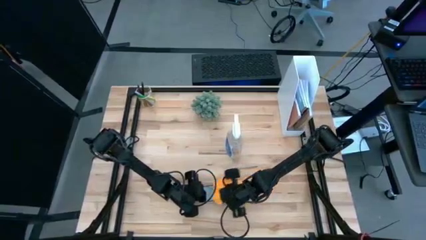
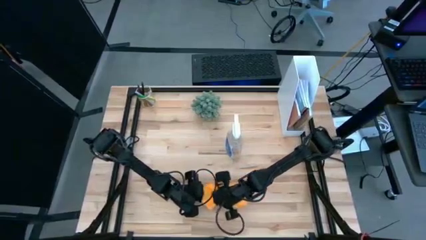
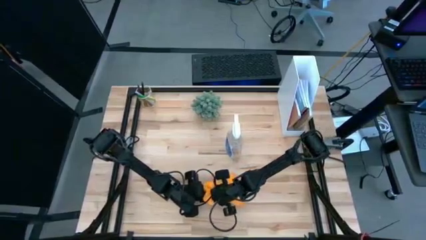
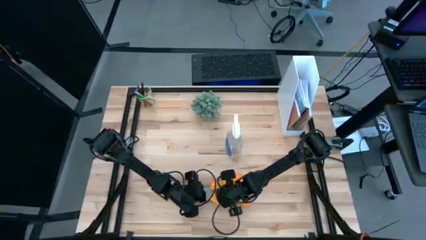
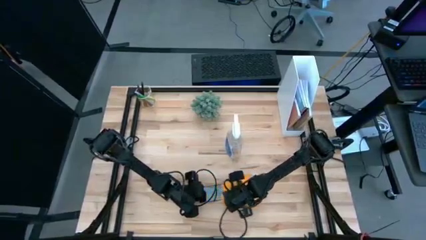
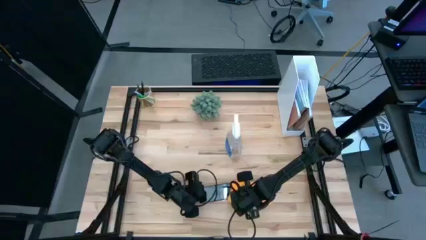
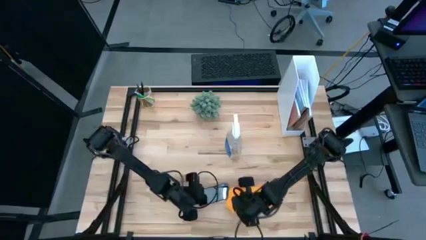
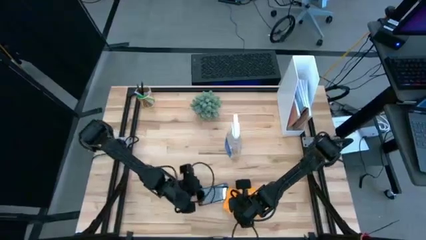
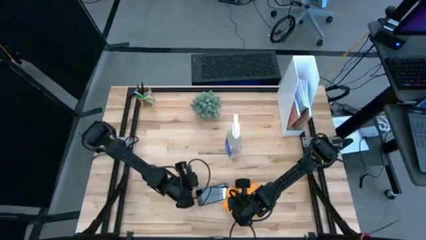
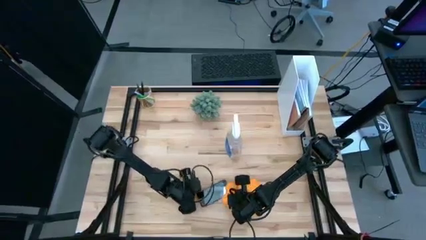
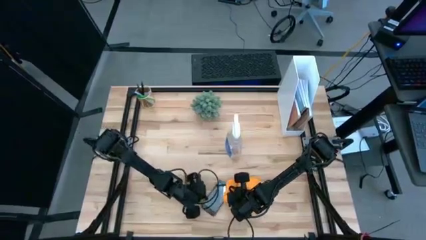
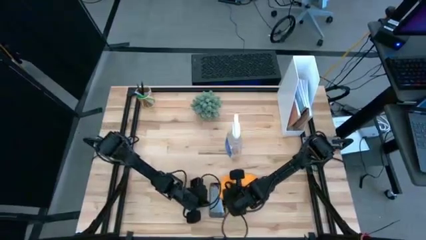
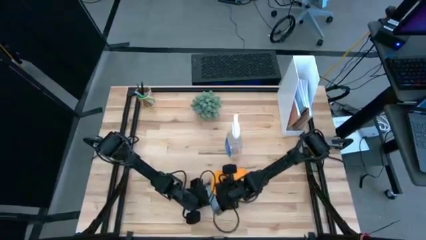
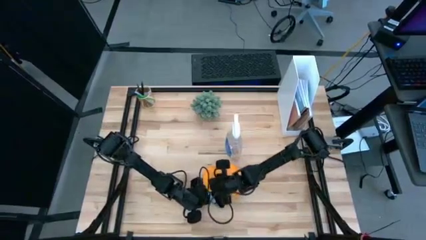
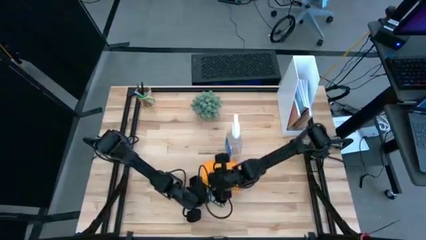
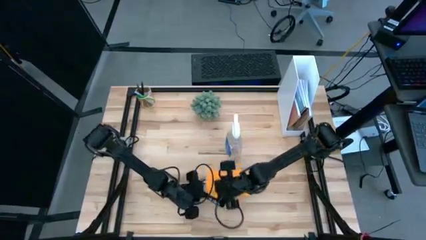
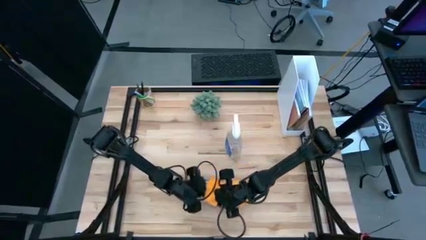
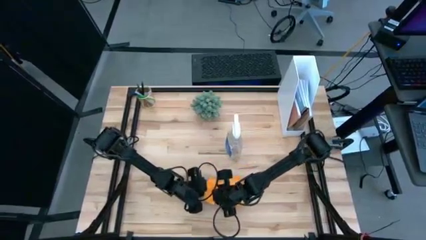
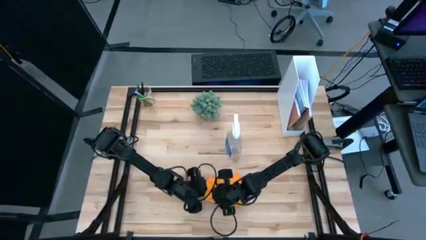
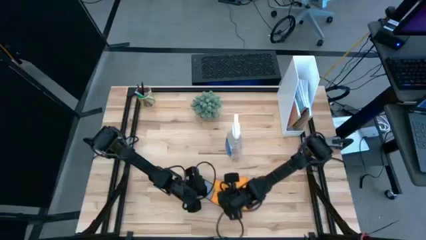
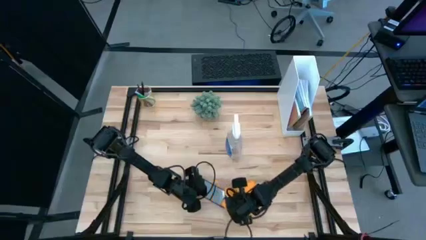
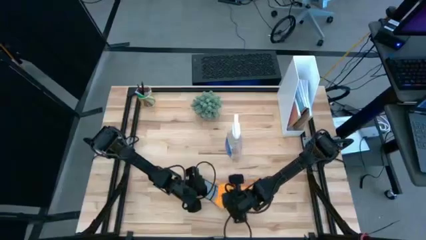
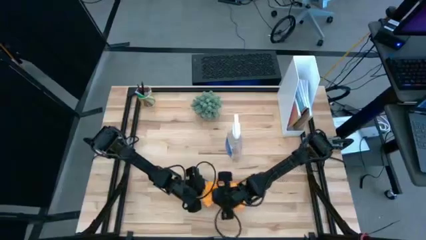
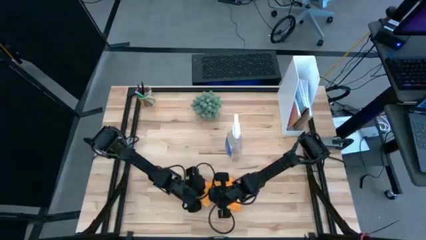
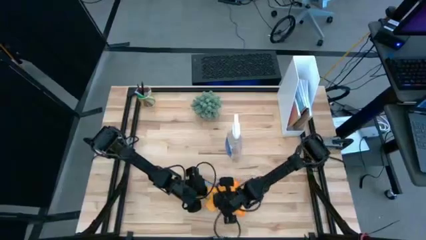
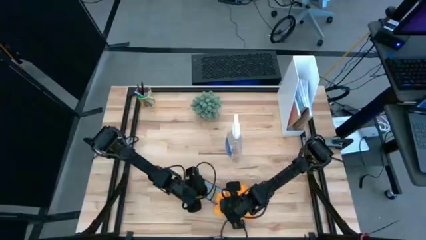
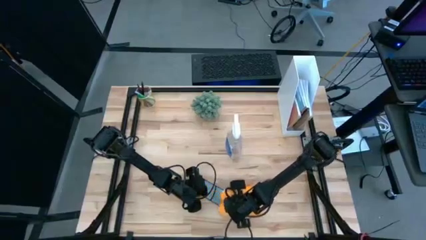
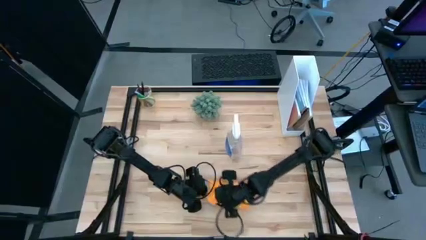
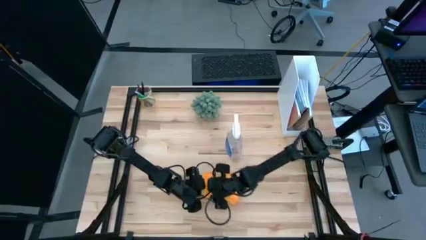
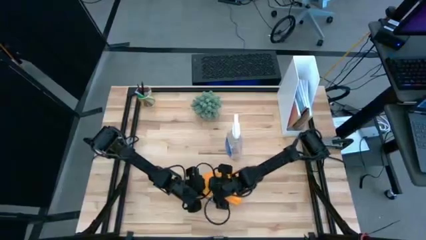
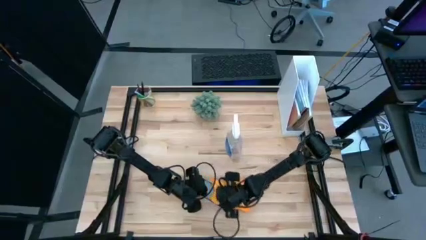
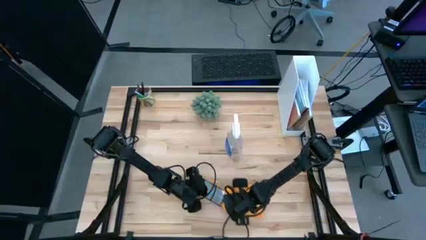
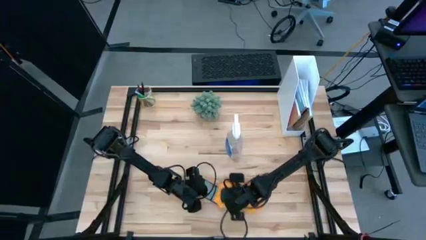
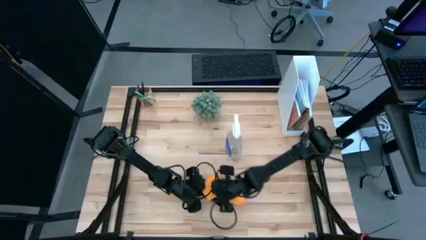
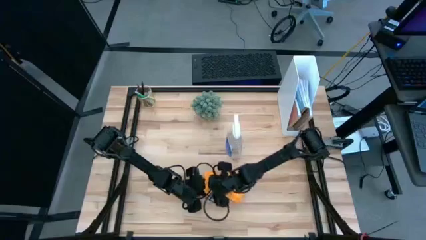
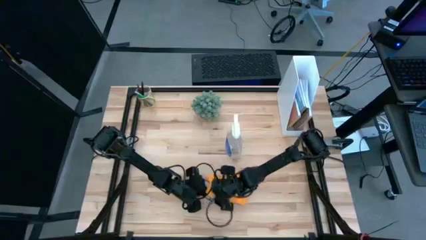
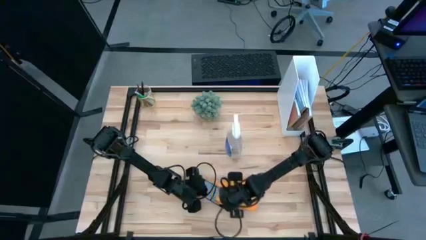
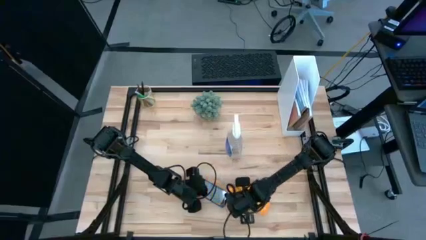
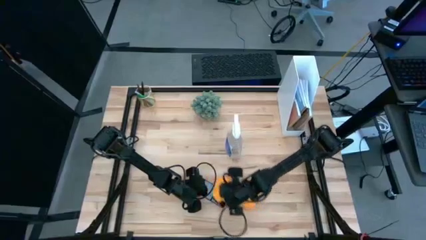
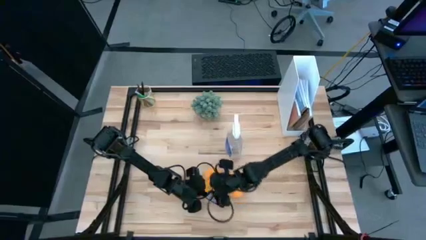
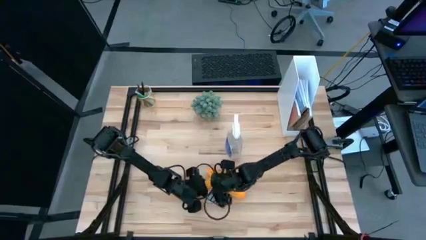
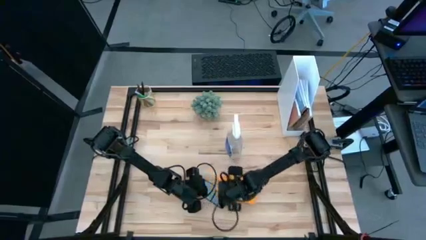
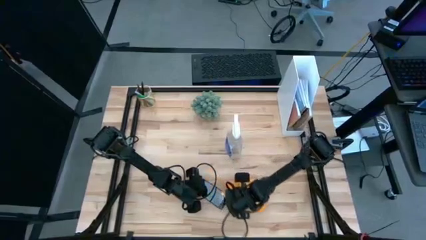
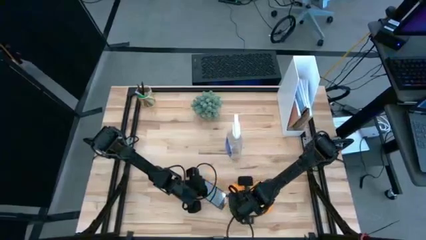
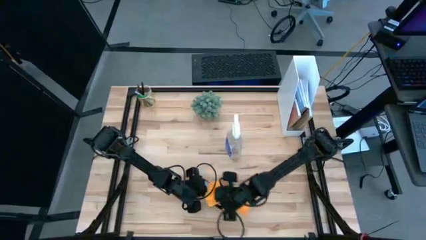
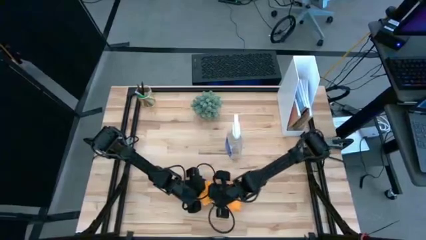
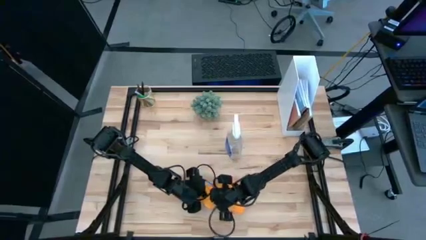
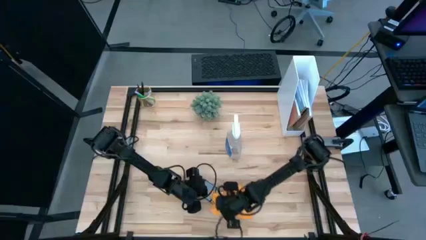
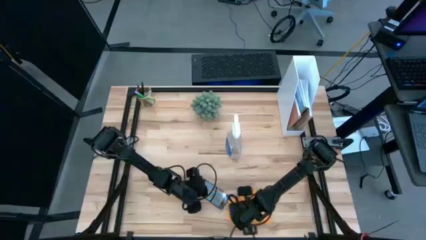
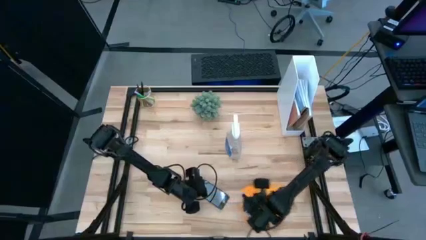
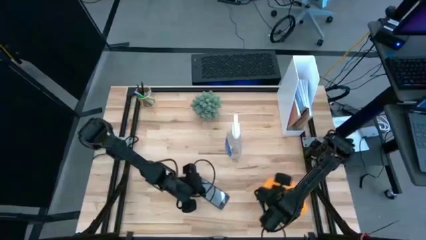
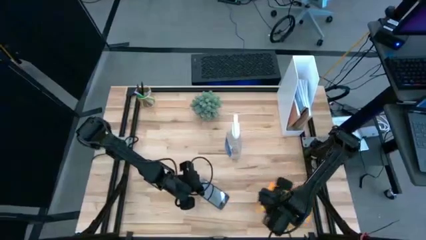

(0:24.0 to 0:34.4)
Task: Apply microfiber cloth
Wipe the cellphone with the microfiber cloth

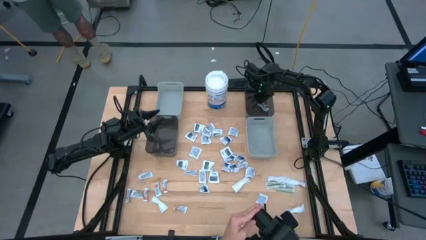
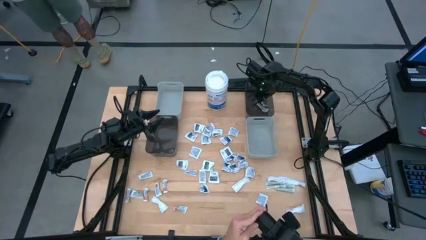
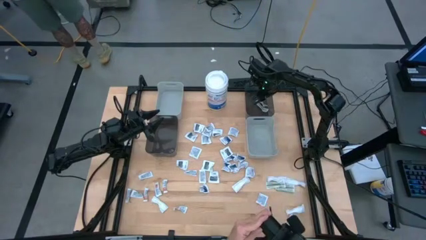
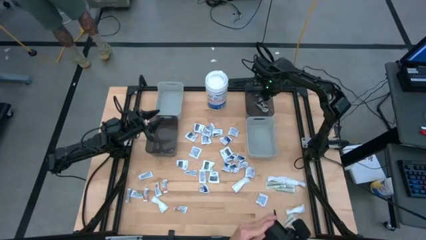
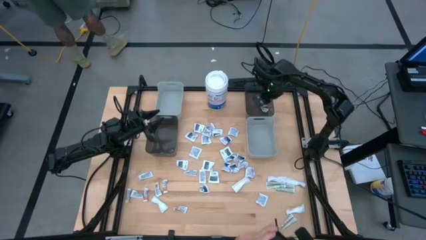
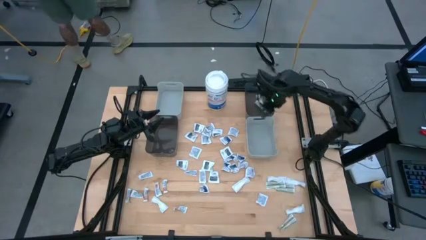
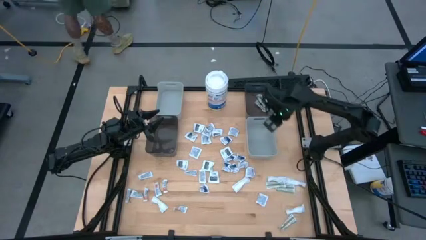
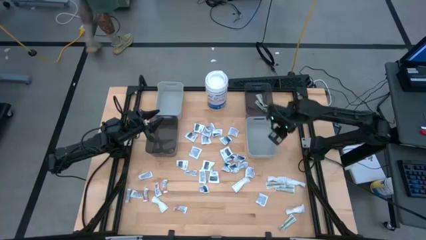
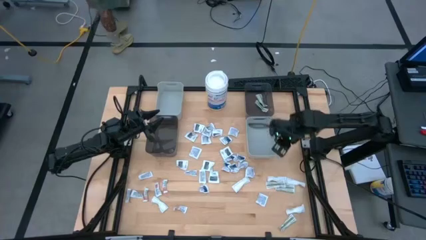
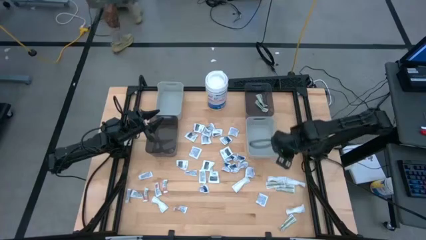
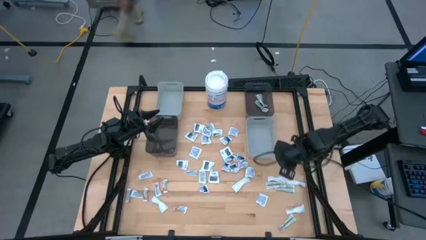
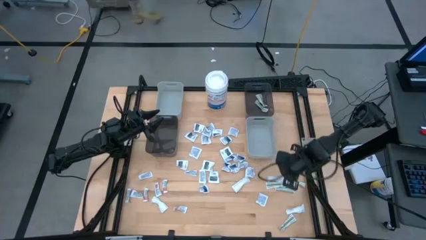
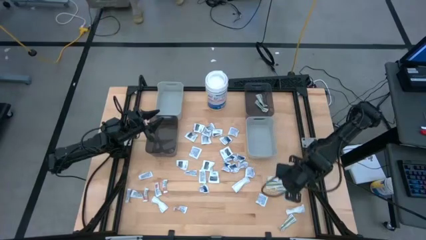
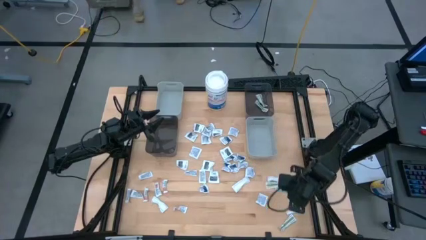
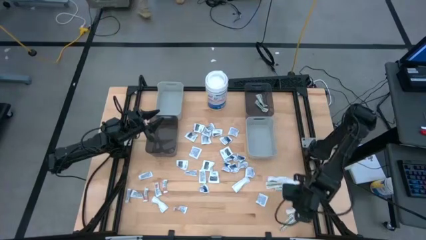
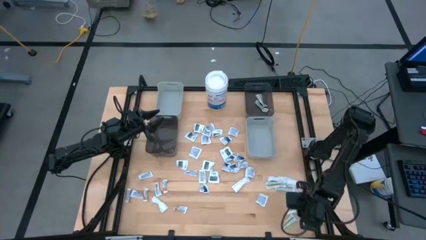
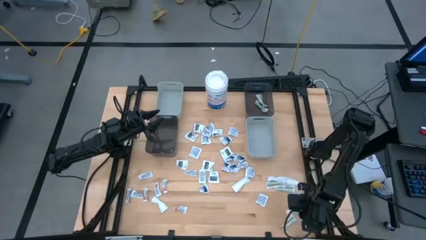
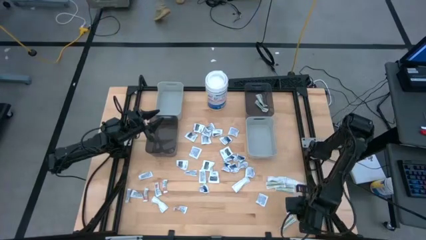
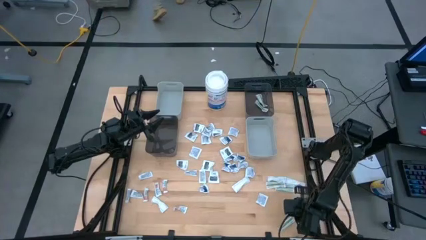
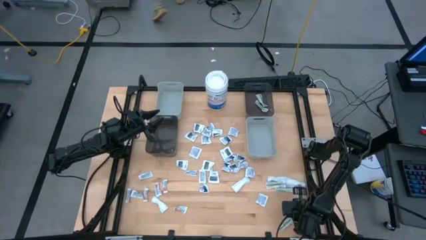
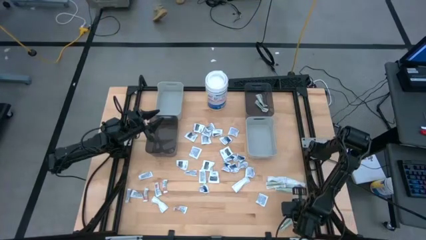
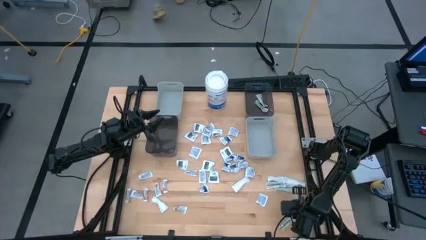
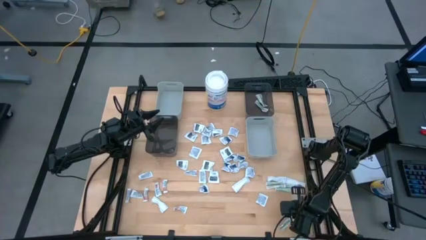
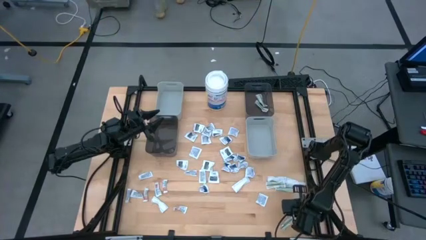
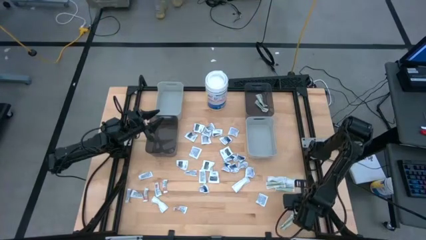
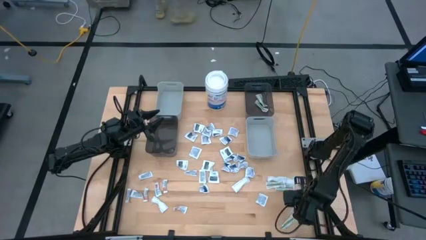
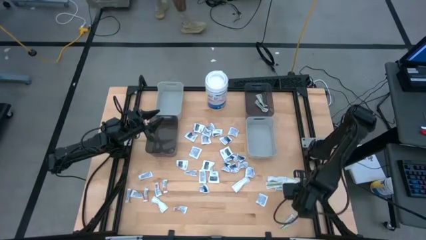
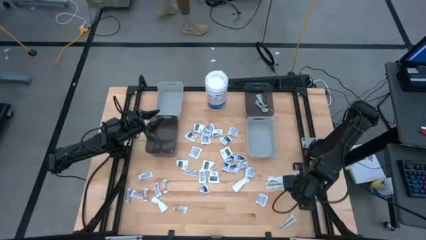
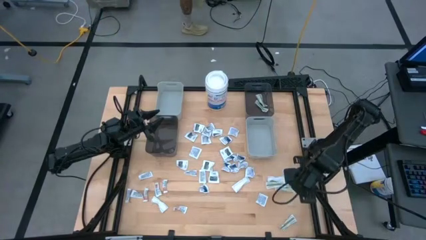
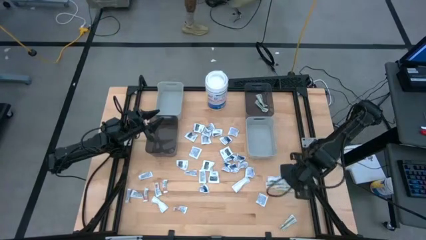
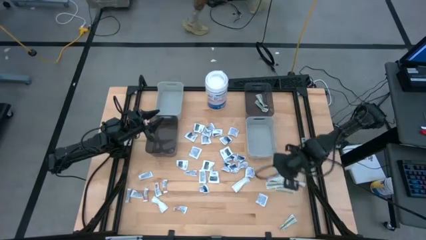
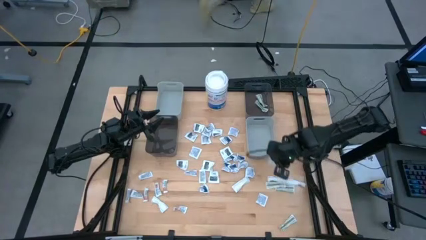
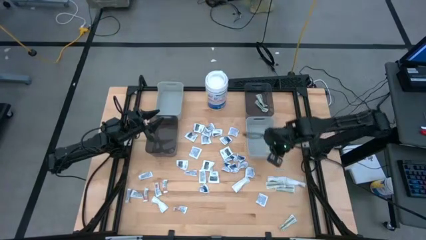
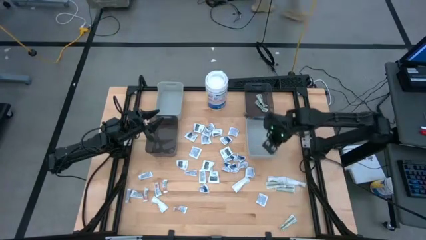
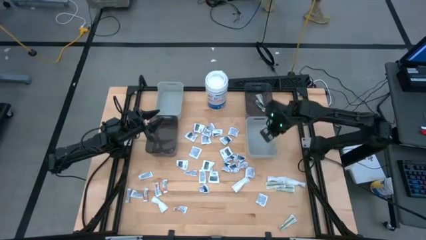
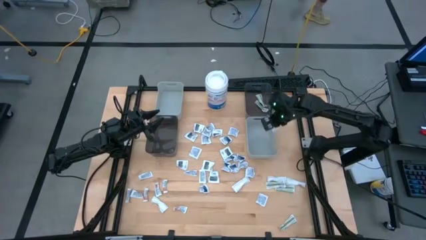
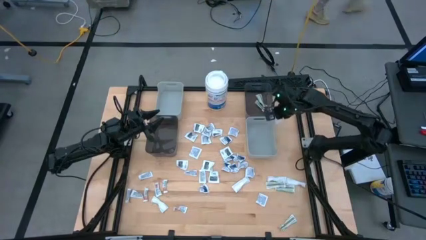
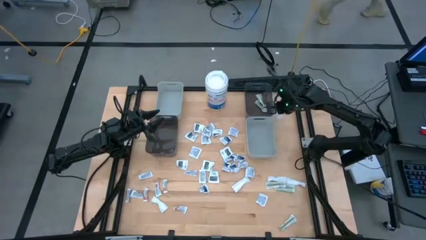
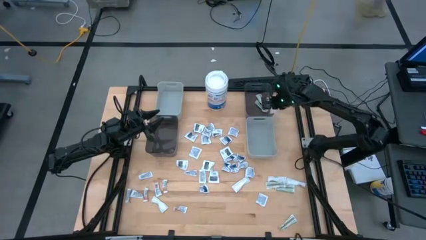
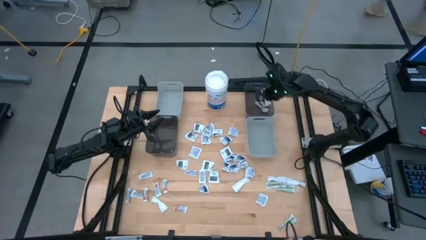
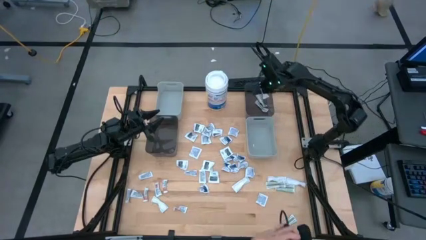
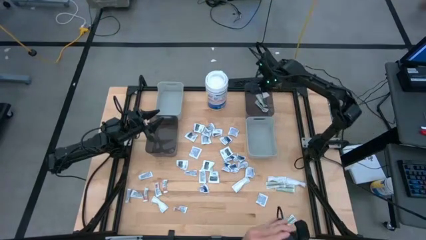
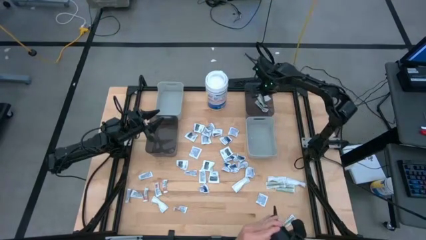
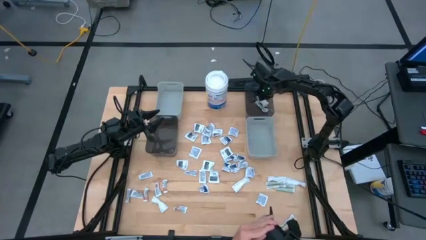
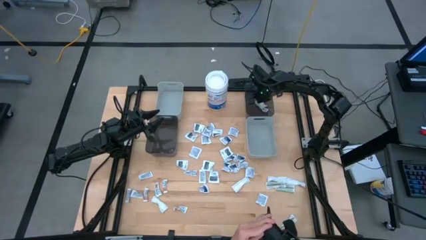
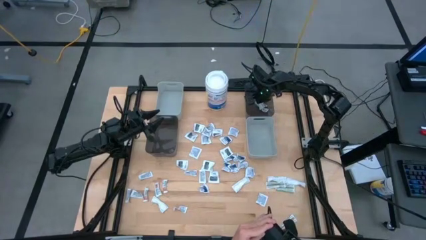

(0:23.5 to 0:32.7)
Task: Pick & Place First Aid Supplies
Put the green bandage into the right black bin
